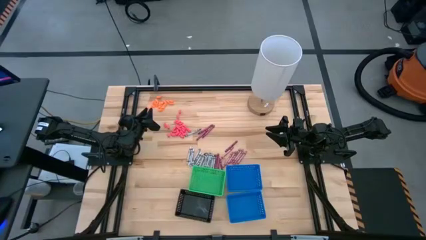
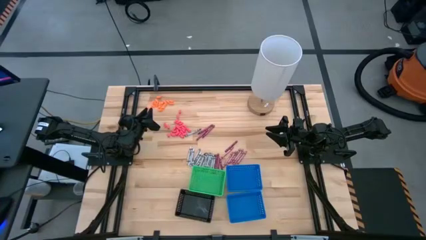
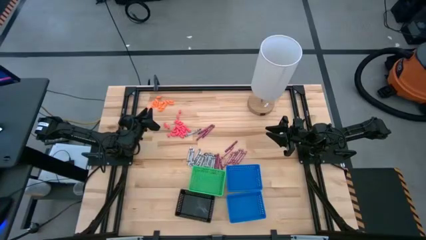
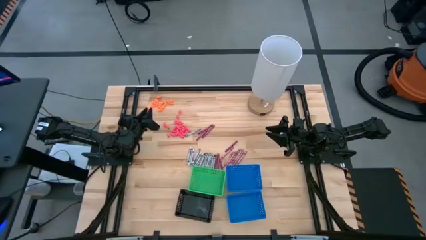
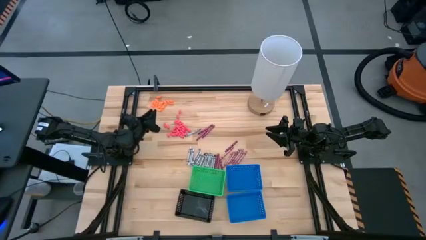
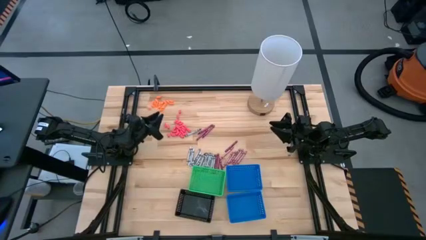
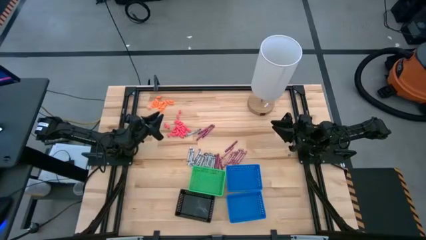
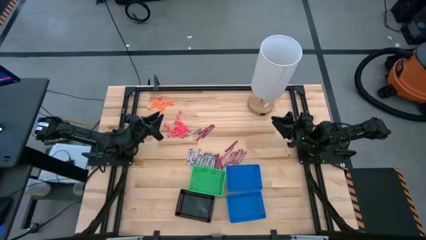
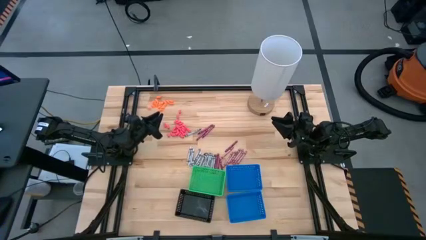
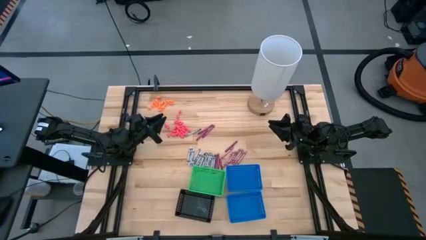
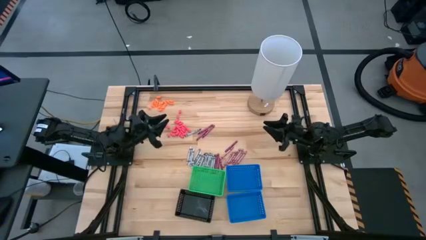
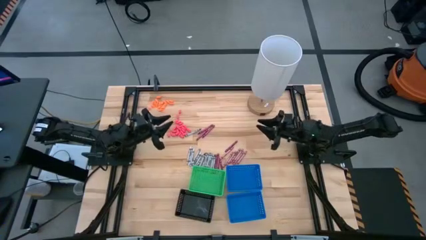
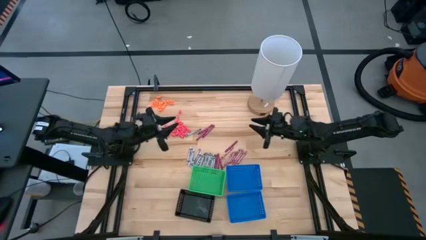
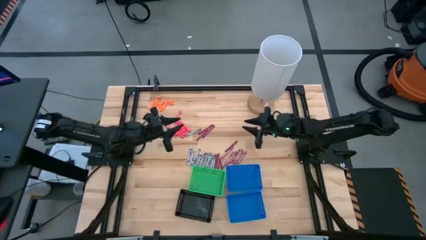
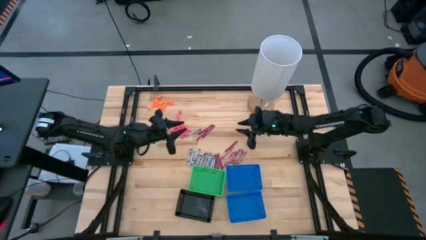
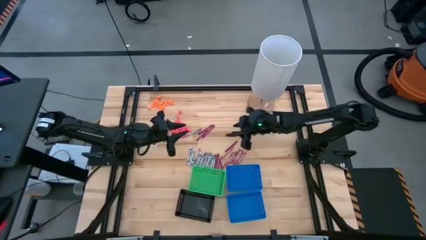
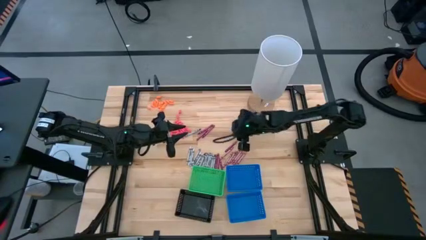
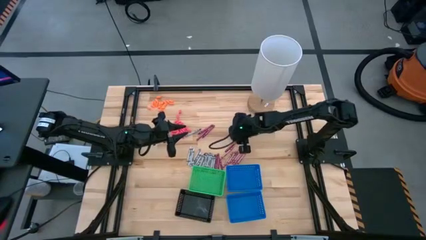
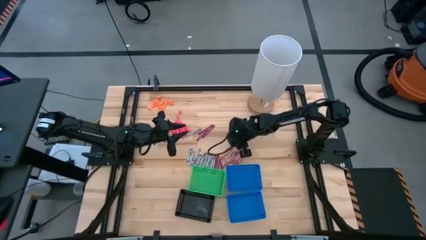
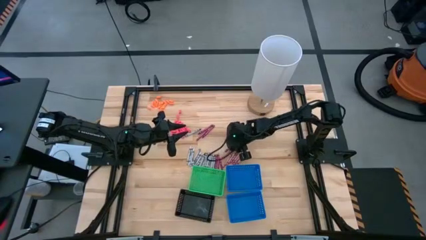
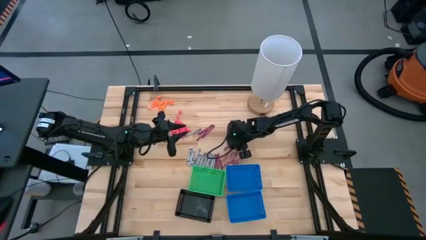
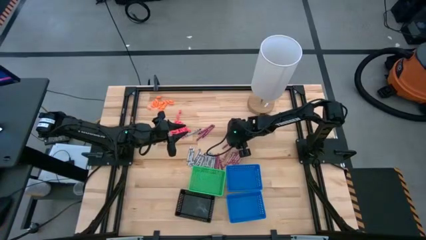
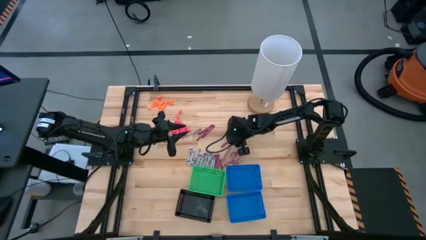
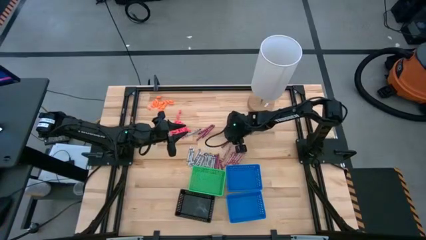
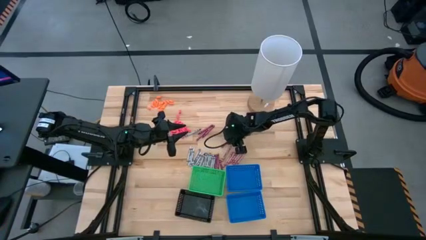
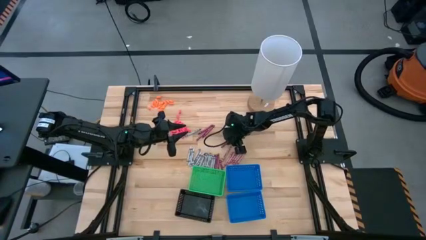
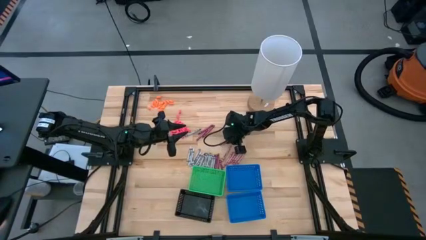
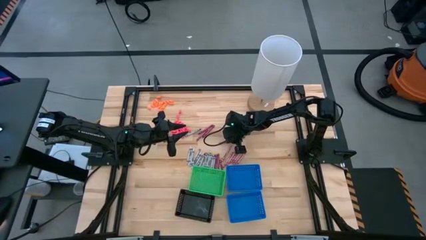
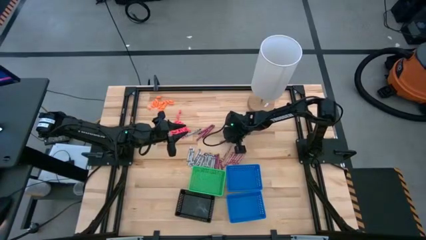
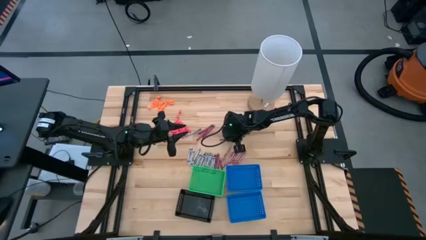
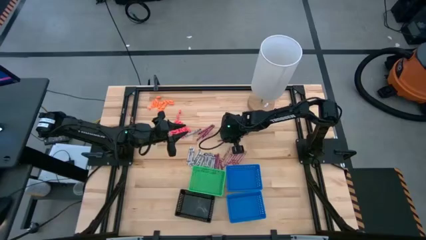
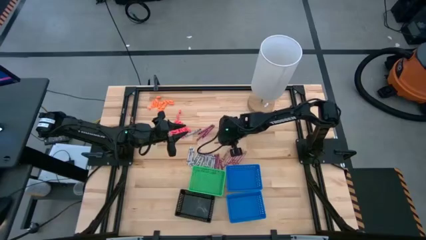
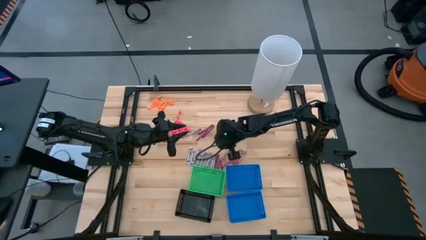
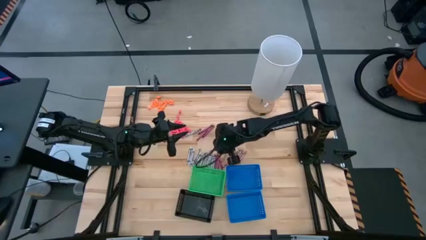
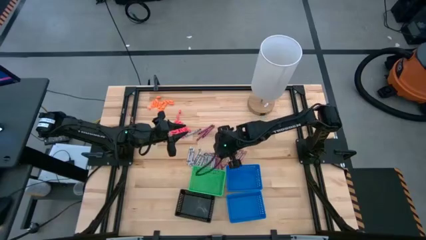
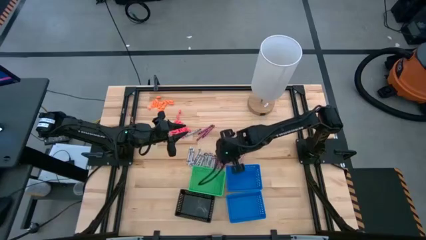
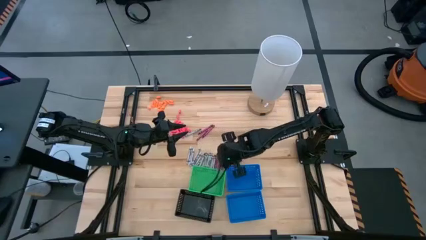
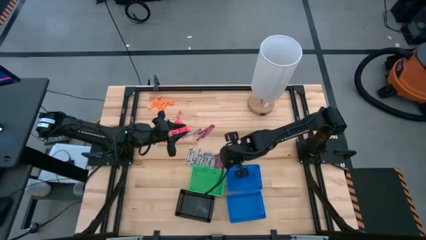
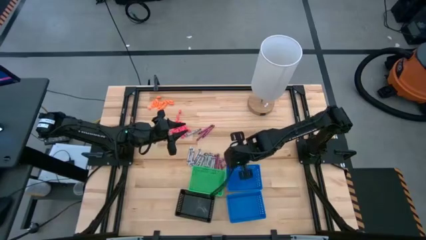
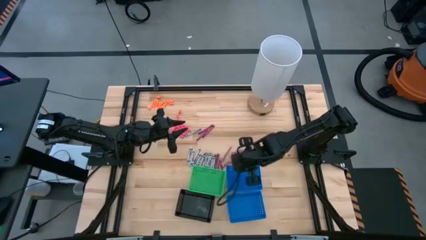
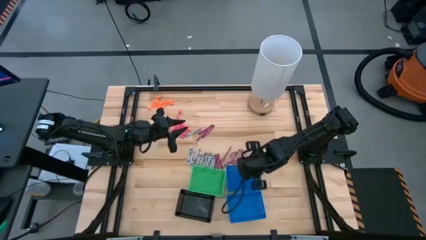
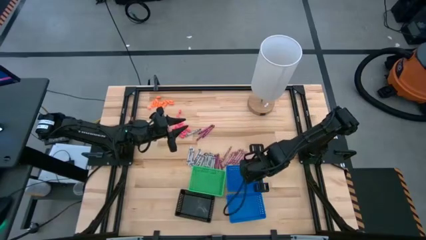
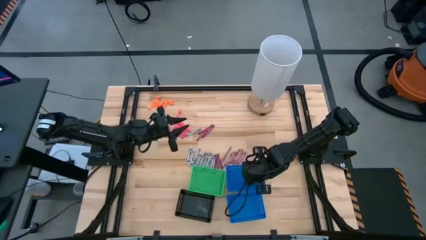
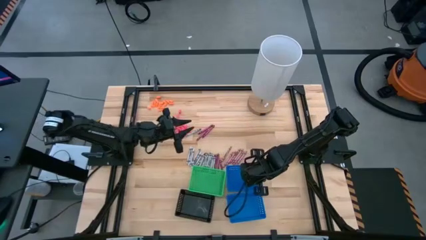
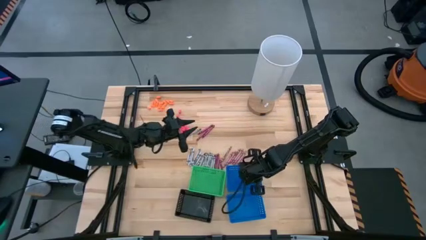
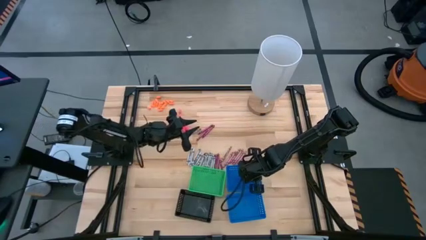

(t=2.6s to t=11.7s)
Task: Sort crayons
Put the violet crayon into the top blue bin

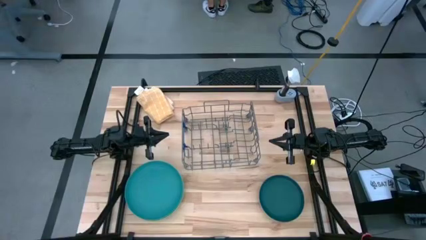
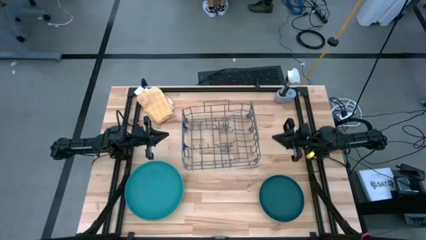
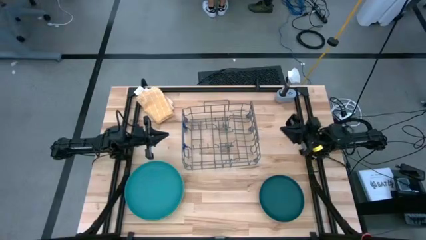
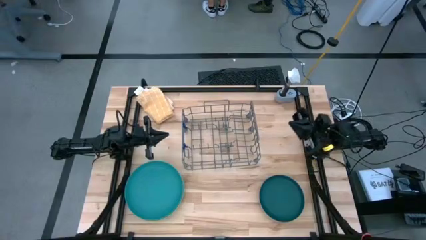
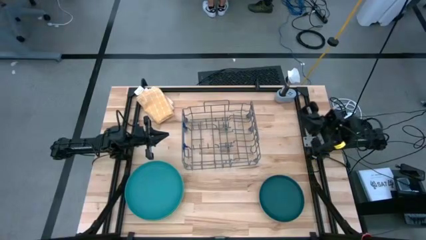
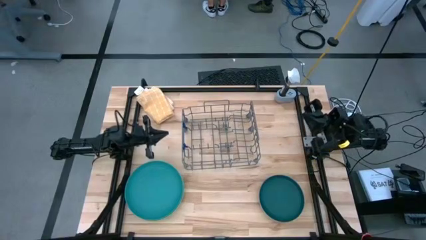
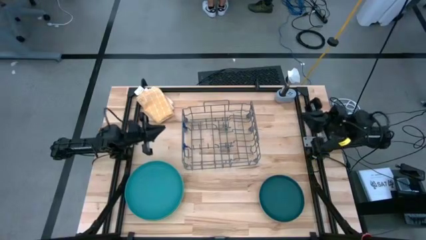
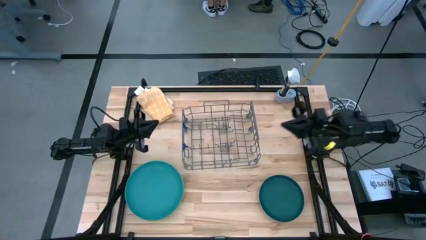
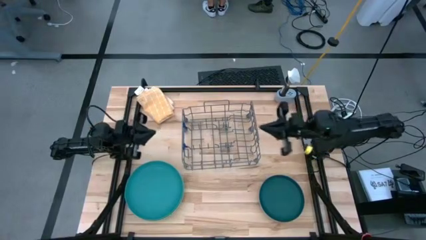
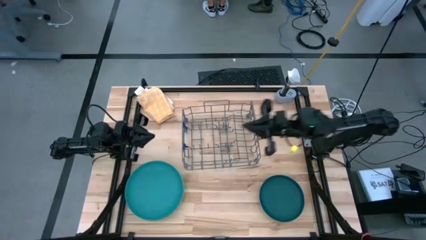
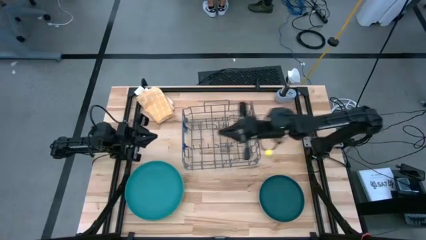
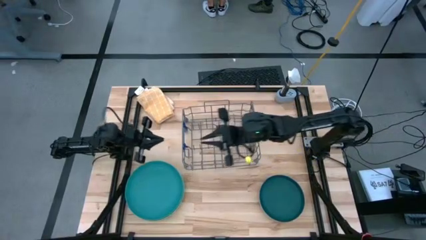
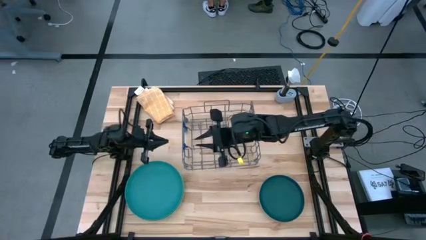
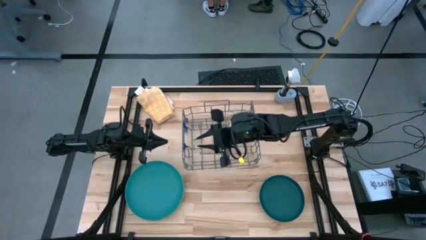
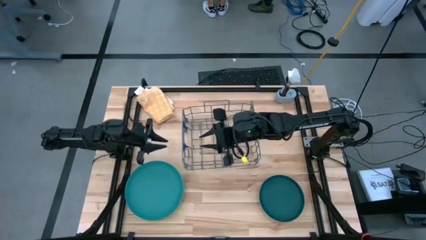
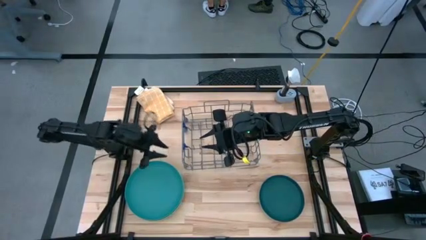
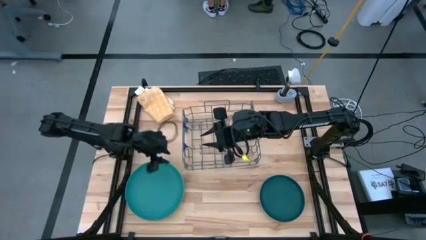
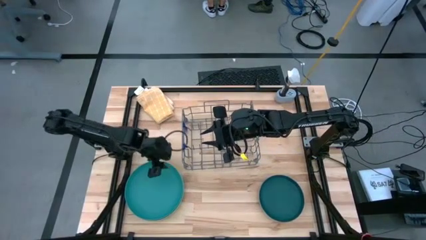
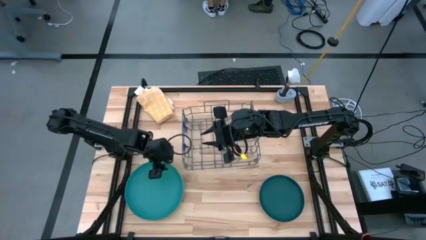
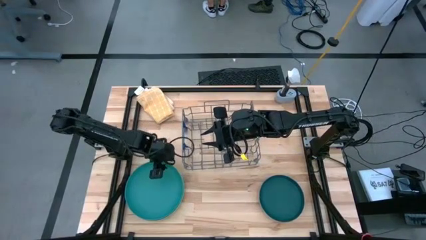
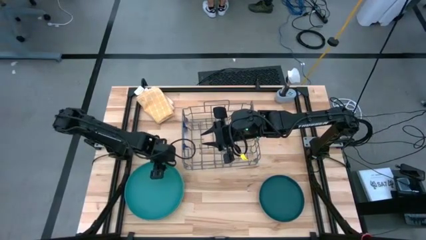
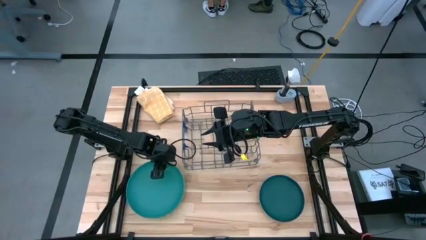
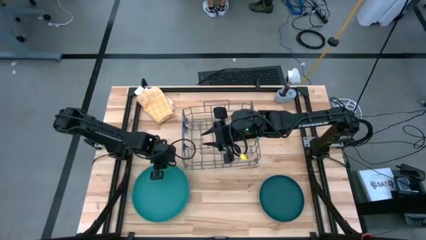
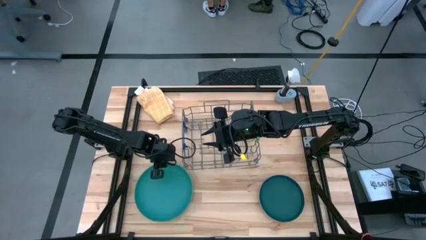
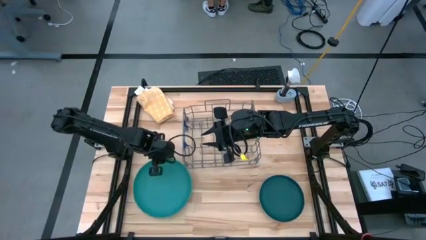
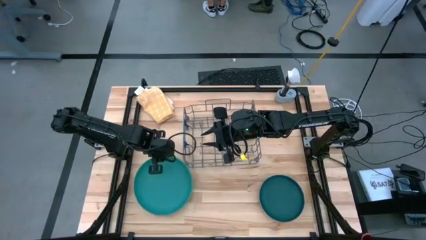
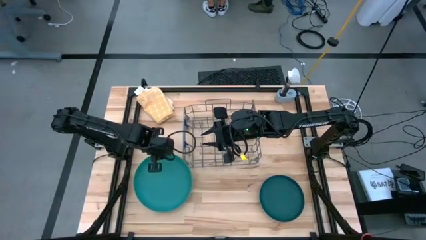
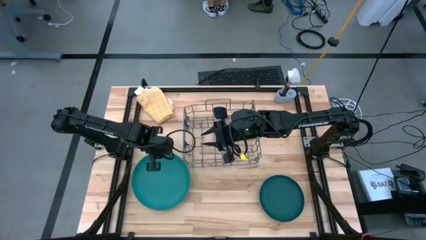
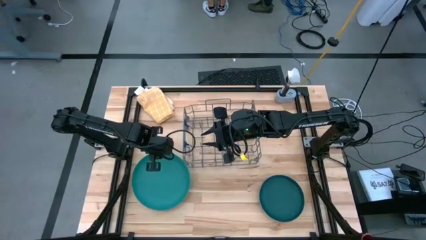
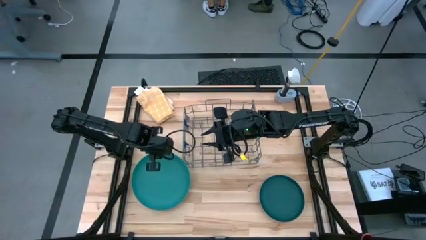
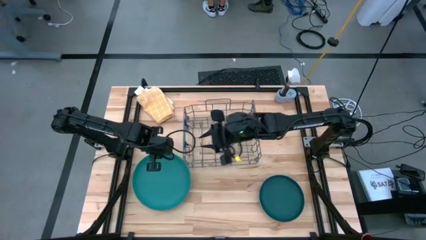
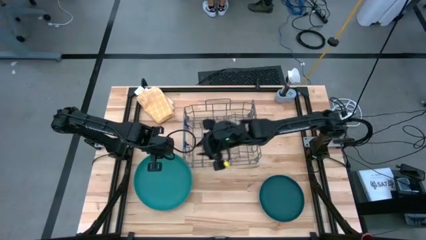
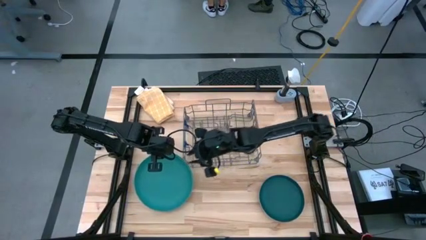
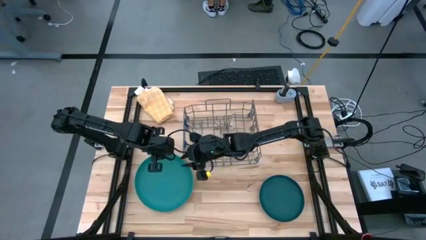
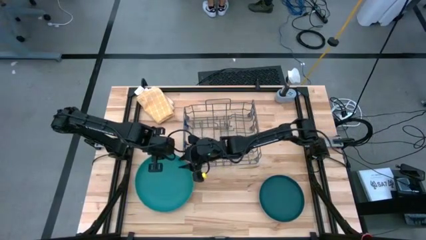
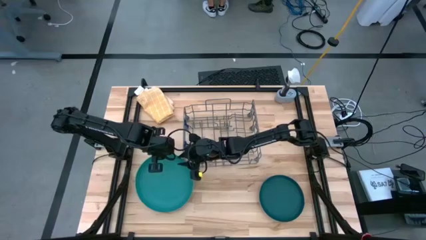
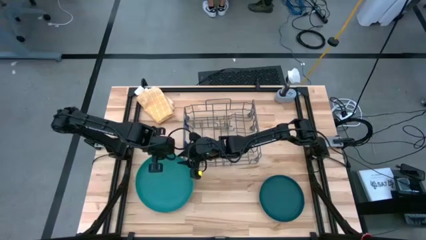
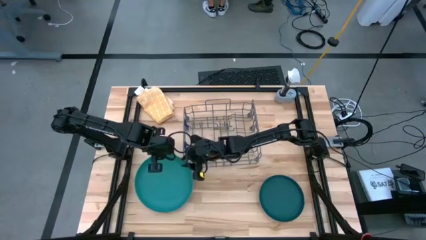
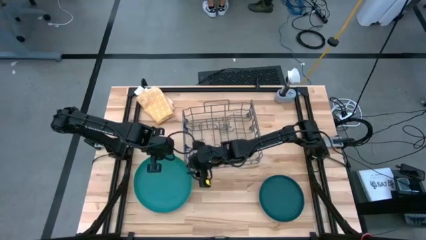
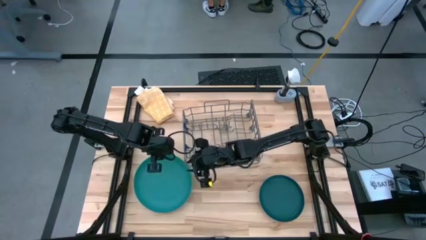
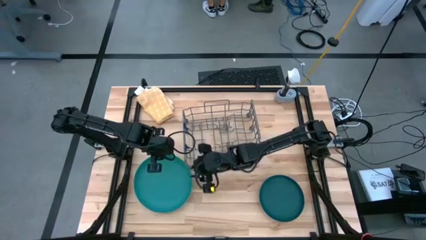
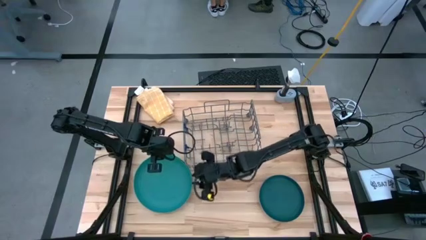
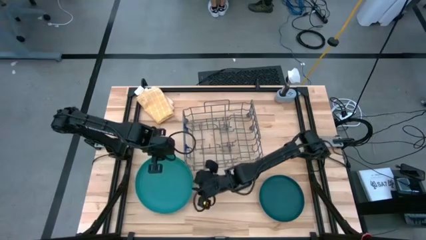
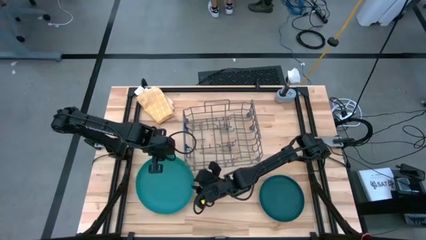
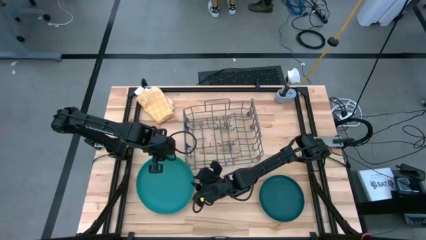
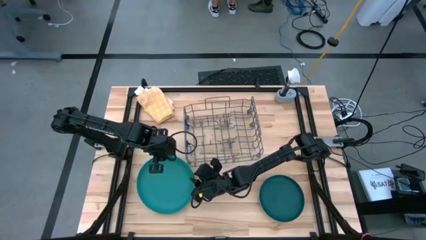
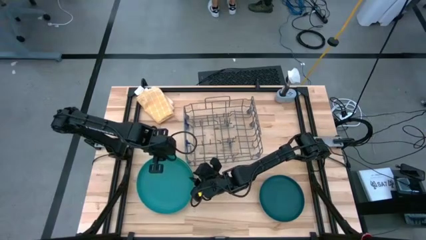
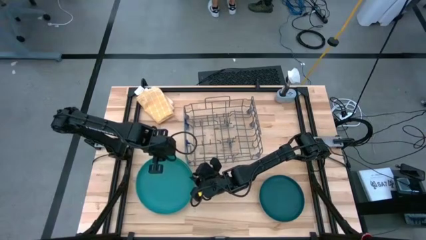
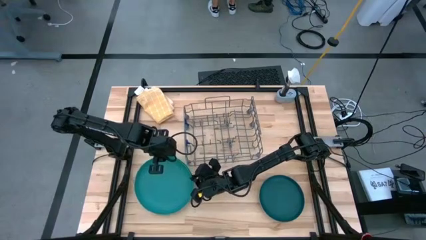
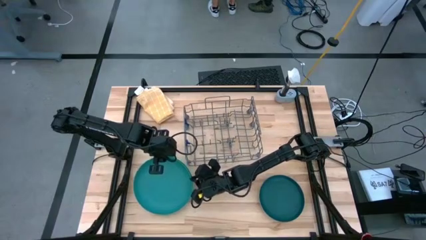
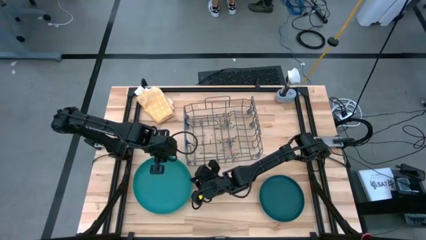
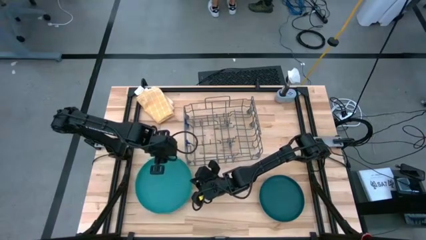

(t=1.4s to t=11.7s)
Task: Sort dishes
Put the blue plate into the dishwasher rack
